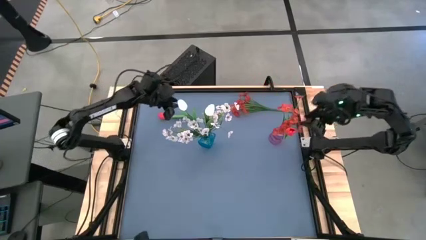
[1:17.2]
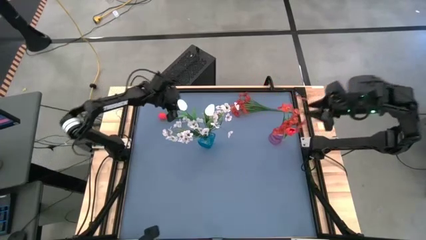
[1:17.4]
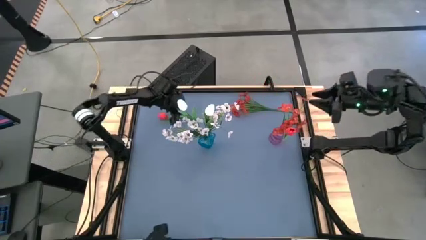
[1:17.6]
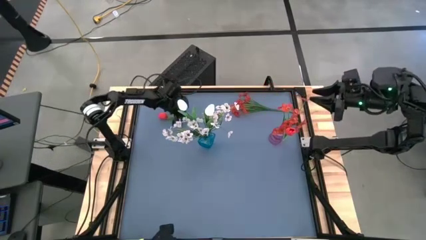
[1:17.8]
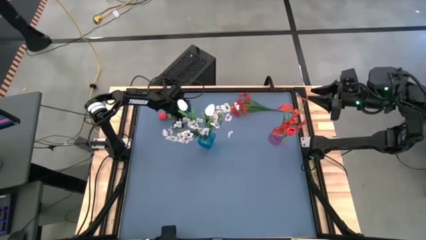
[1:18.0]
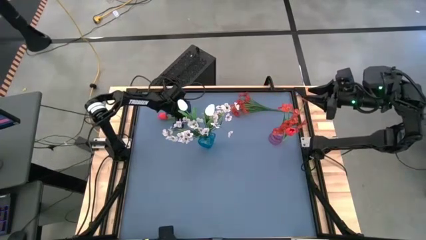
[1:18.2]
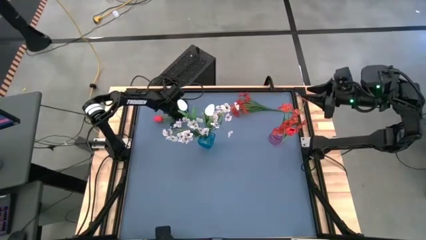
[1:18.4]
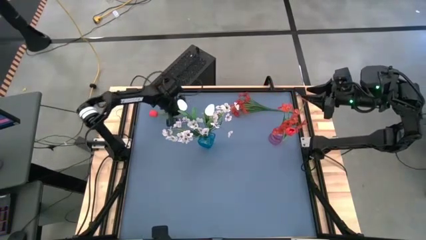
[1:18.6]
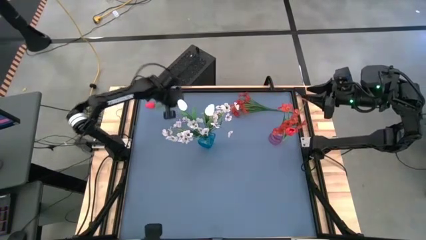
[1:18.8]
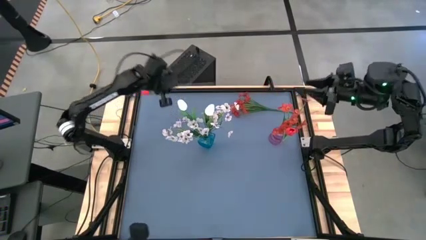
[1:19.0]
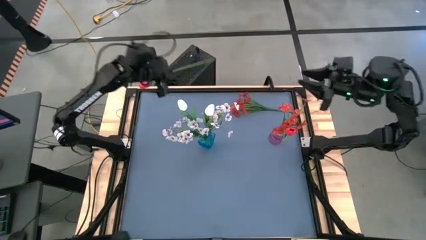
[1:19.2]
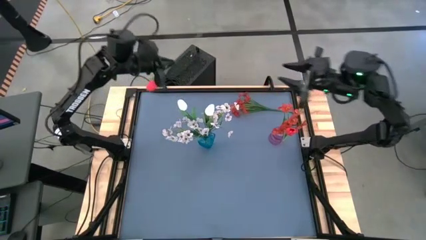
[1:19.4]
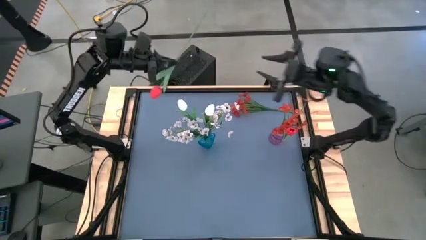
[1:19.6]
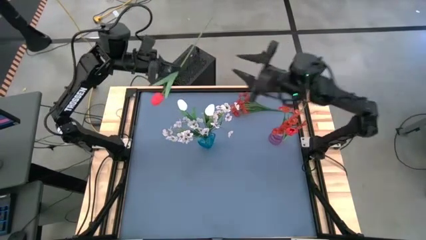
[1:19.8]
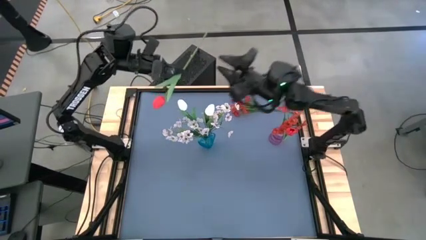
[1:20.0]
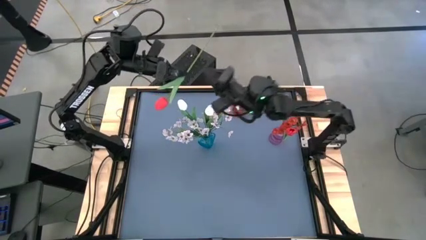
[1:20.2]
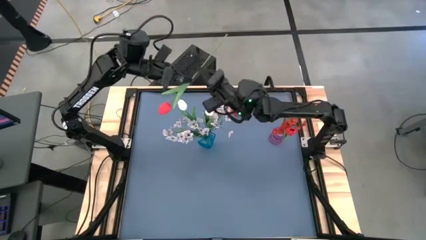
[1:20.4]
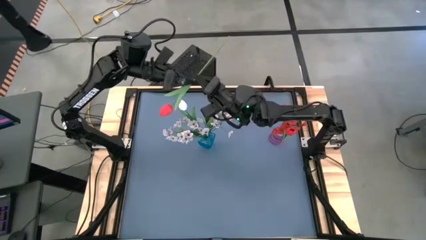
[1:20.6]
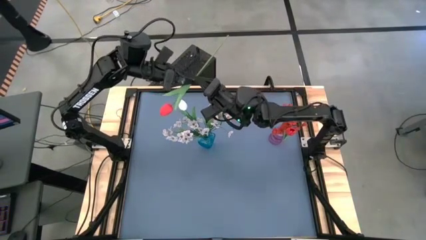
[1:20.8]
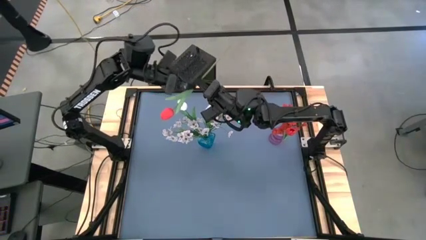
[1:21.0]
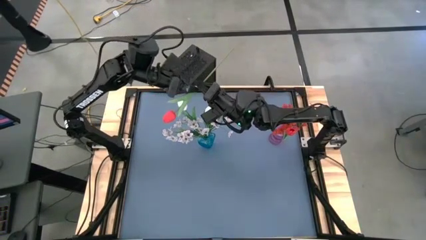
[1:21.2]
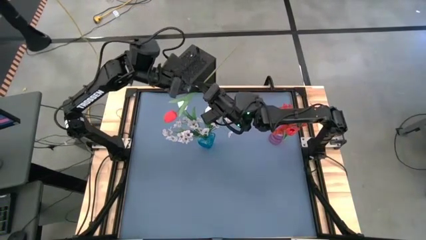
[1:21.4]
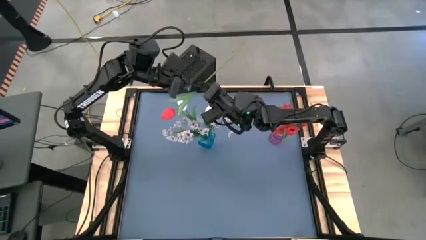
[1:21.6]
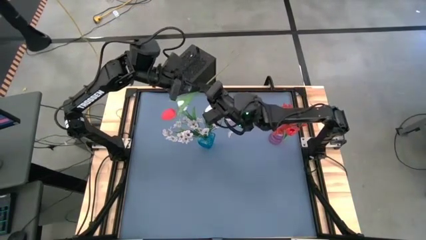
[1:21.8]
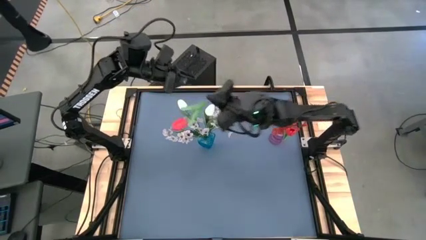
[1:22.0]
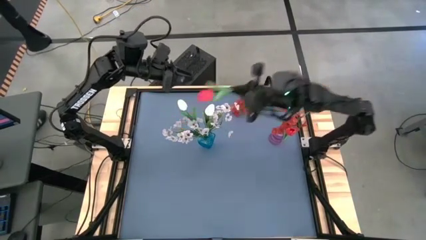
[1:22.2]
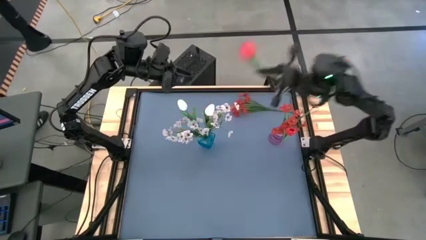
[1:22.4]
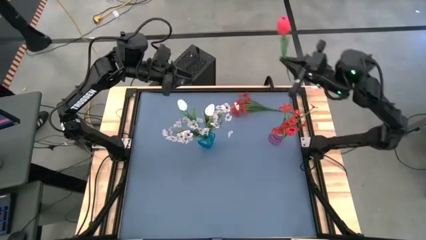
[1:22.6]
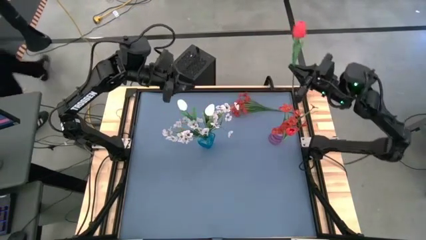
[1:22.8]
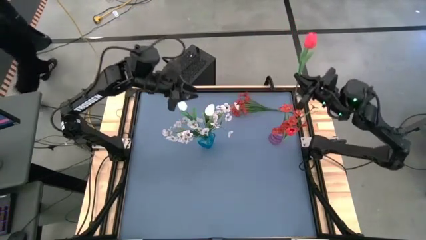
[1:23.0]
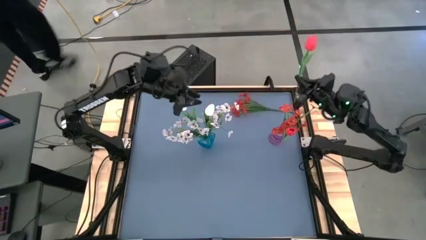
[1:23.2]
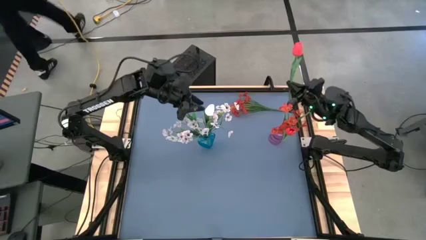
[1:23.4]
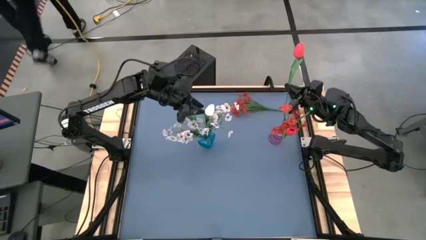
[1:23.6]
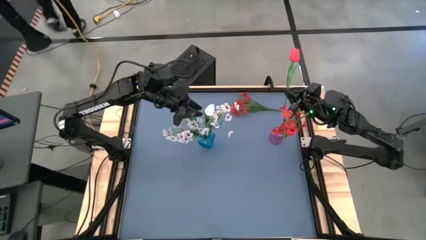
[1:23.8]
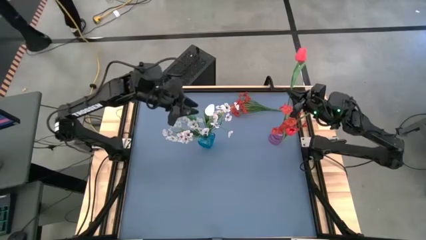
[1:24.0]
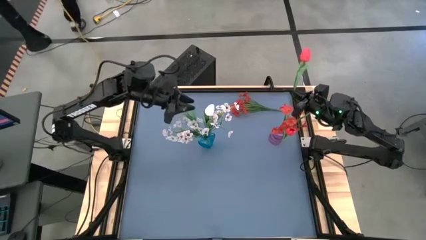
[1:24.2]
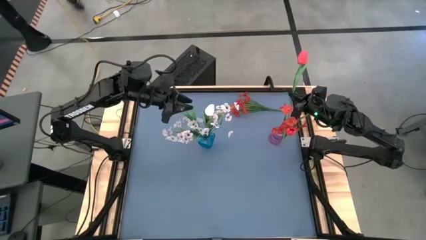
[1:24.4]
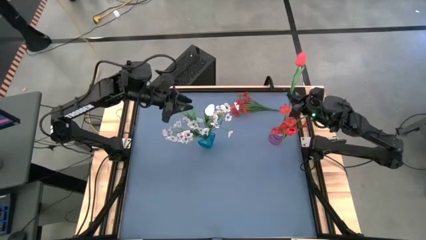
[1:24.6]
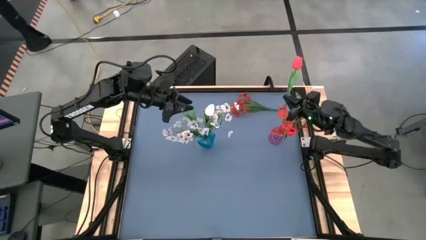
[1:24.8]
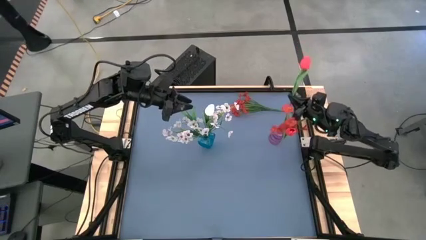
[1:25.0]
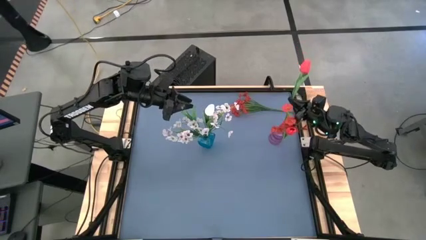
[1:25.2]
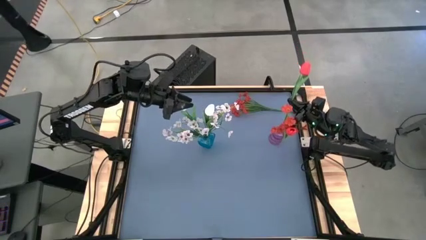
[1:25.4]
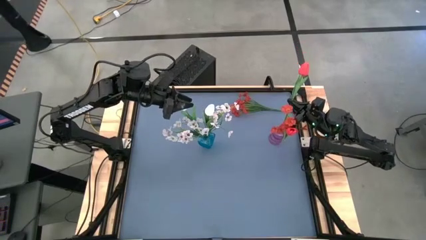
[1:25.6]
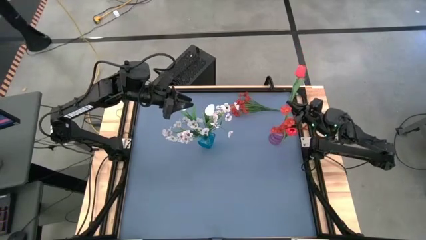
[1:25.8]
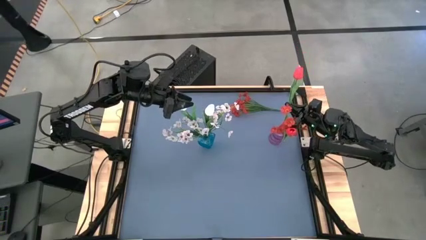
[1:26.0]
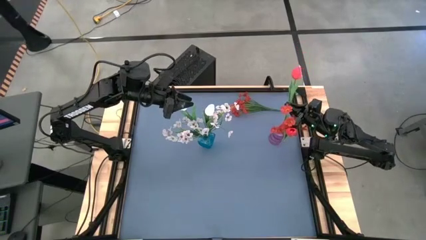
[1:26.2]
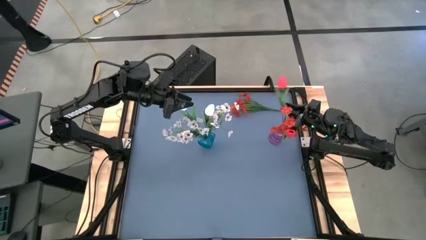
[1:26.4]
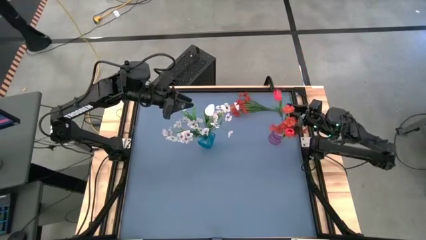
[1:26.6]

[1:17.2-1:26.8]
Task: Sort flowers into vase by color
Put the red flower into the violet vase

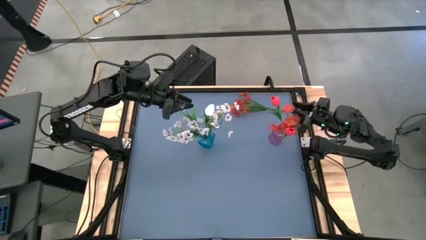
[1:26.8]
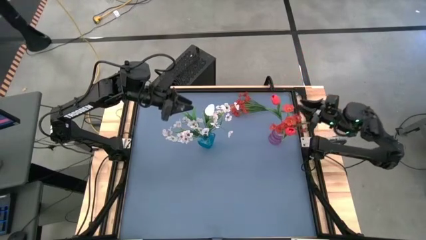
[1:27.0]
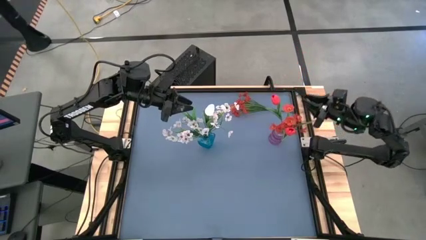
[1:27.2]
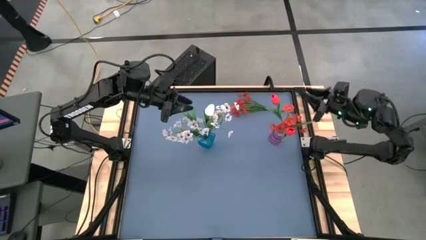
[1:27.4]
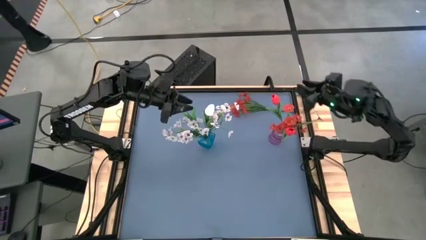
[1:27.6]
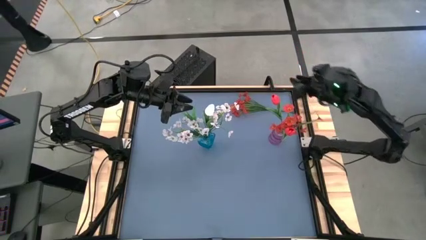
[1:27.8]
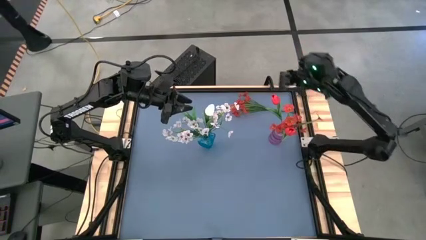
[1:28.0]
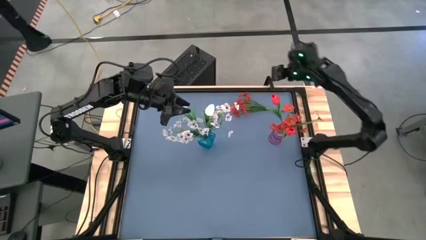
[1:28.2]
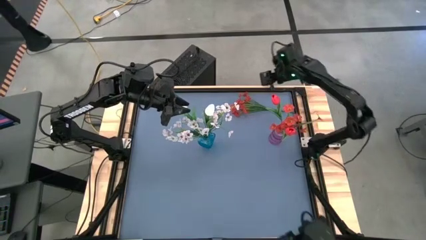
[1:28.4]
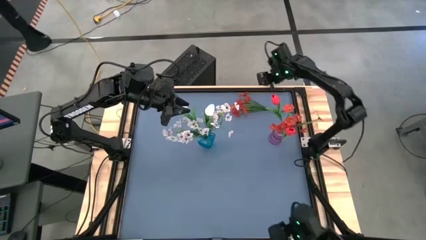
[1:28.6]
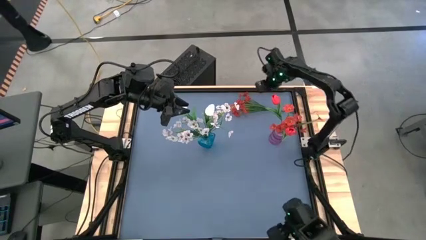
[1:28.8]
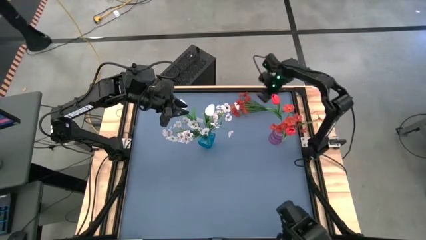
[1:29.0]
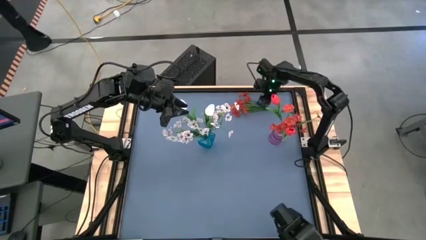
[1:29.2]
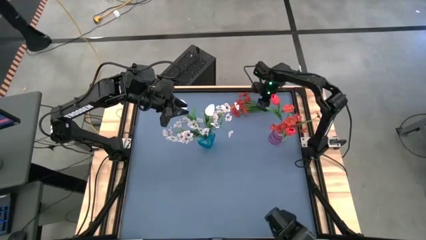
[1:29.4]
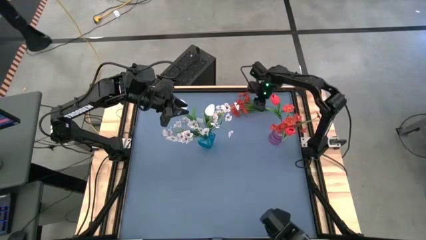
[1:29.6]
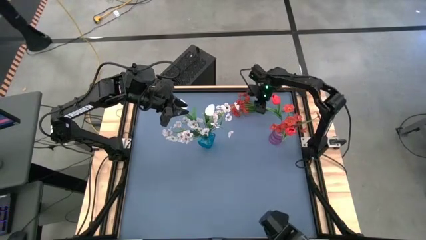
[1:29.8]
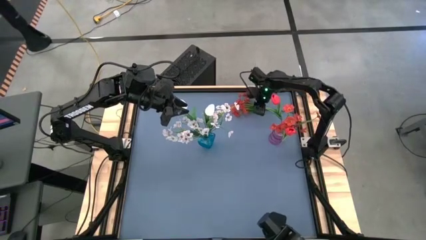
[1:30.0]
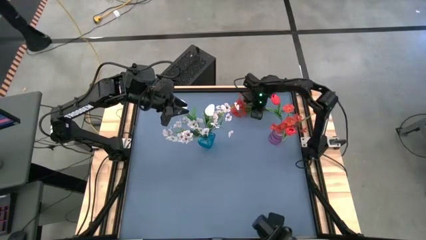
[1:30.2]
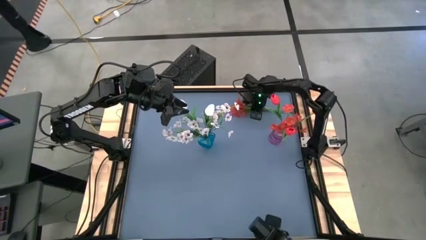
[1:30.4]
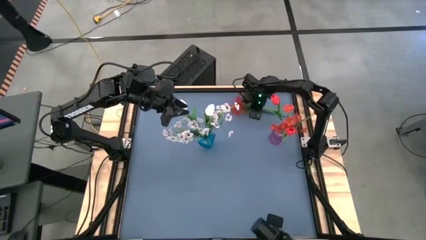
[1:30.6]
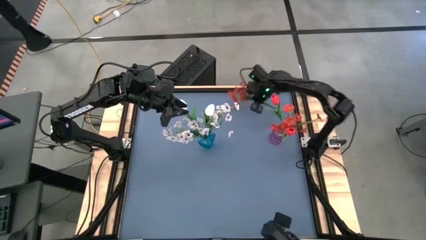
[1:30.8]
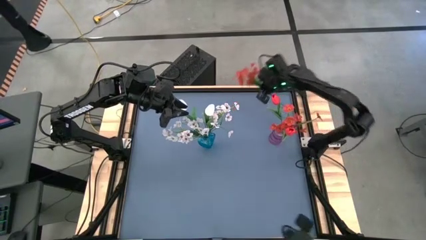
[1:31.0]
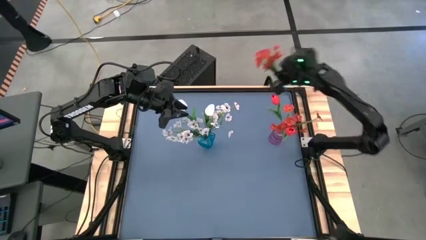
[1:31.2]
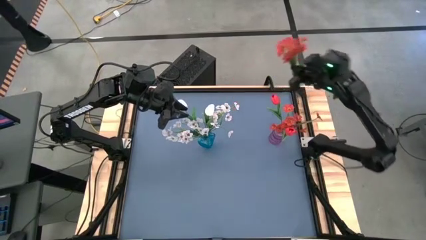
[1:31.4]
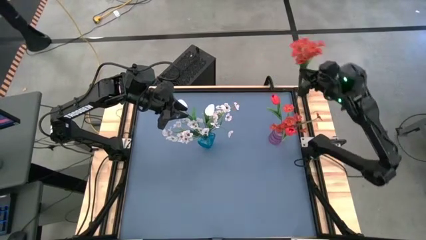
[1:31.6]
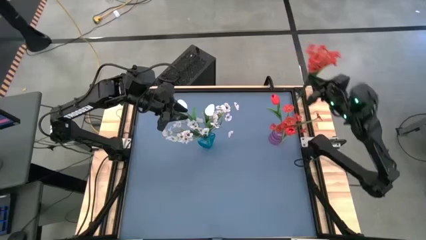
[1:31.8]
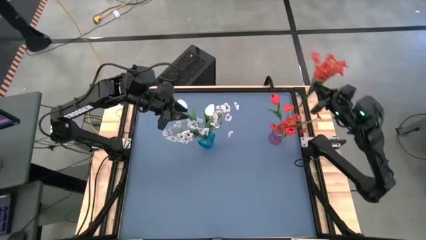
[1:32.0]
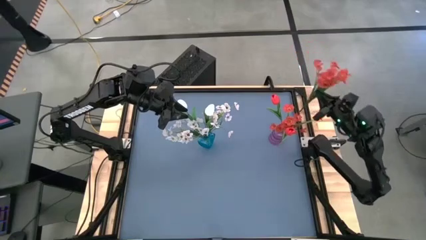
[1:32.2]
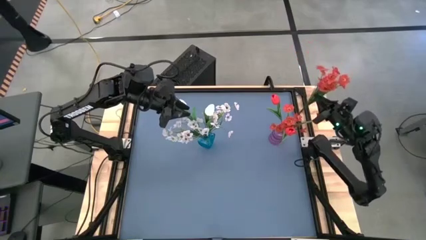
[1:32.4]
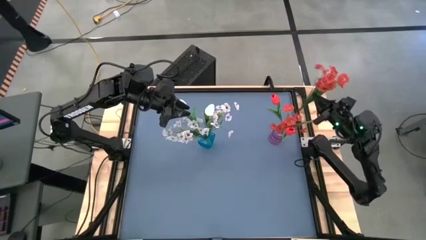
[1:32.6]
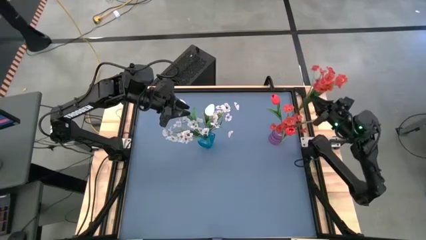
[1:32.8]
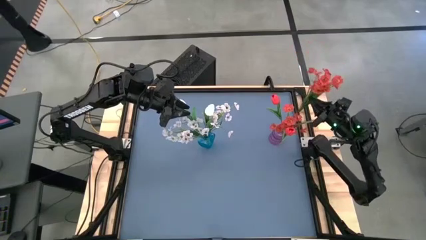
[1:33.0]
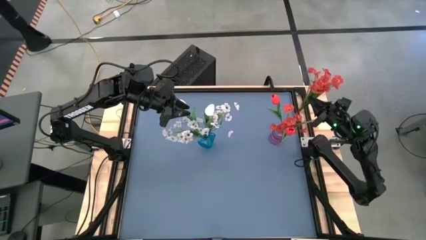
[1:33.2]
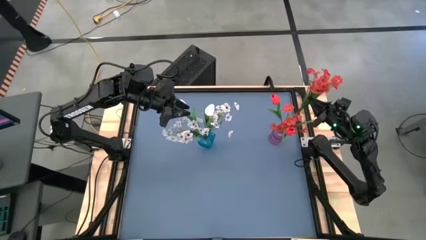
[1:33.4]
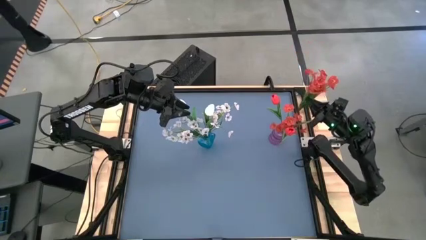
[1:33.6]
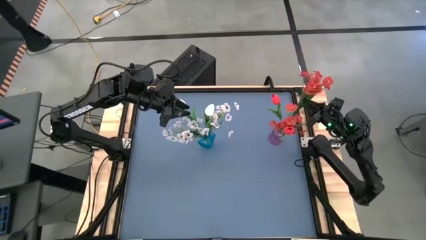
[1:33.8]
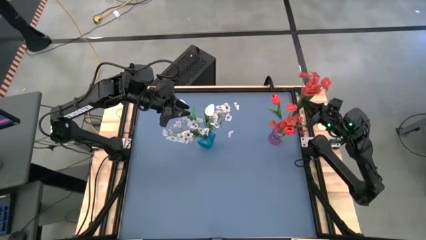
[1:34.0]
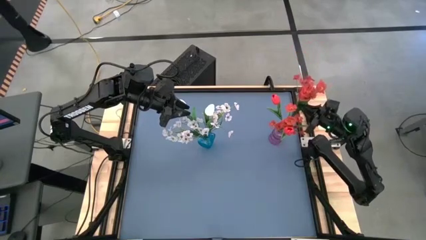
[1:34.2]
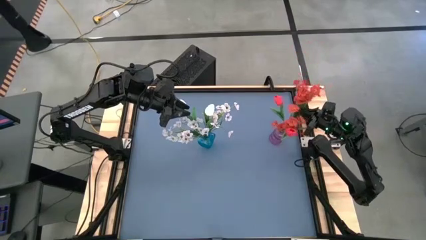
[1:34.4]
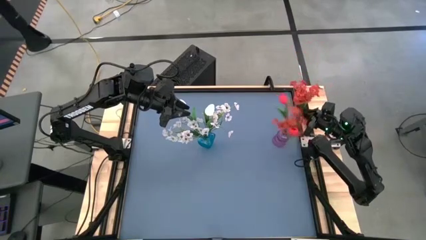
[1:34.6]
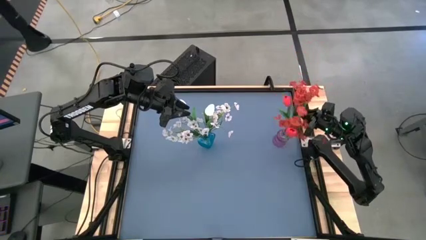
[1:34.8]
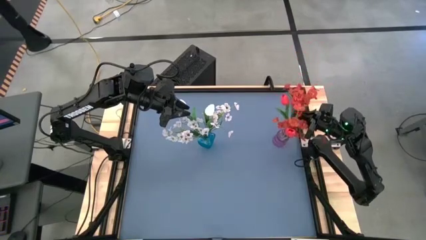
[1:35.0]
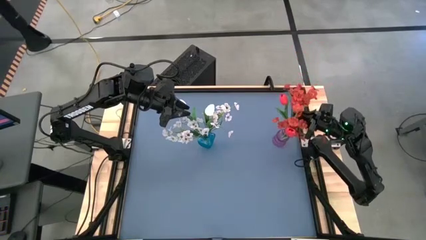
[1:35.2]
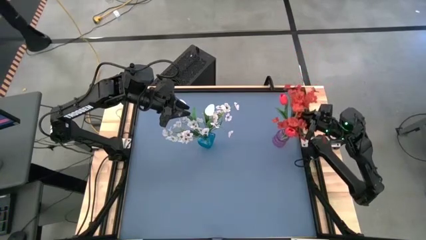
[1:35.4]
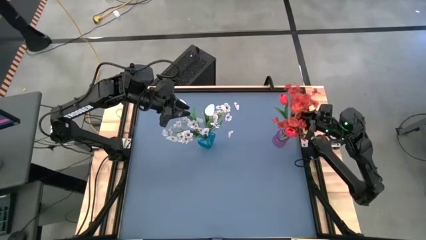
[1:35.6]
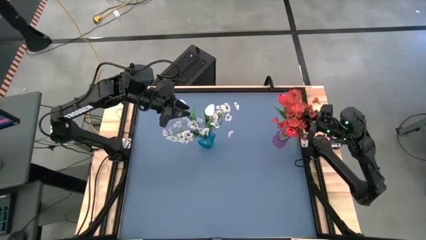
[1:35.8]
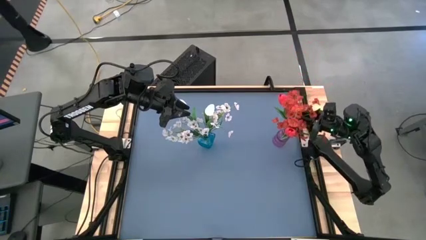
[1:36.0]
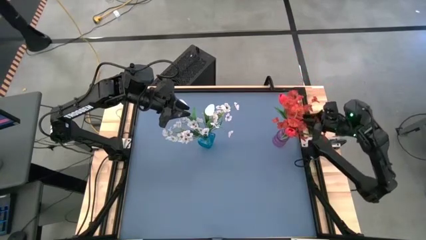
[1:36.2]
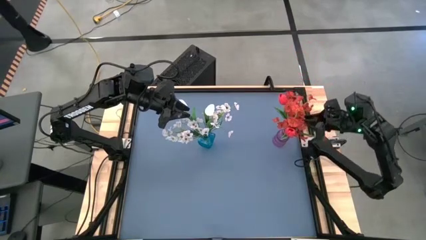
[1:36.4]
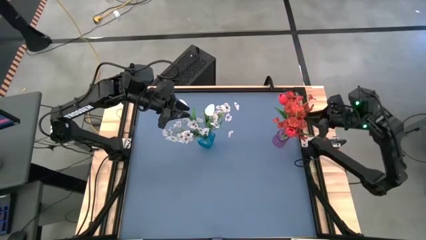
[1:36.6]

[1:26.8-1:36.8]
Put the red flowers into the violet vase
